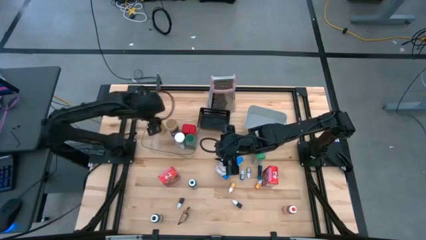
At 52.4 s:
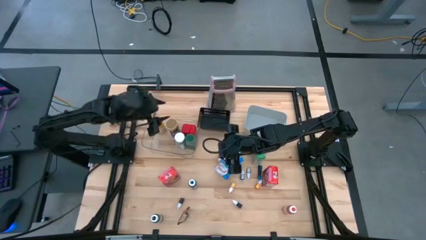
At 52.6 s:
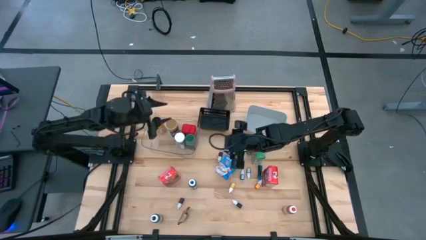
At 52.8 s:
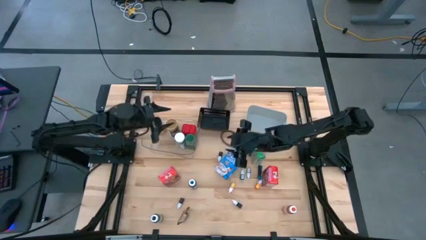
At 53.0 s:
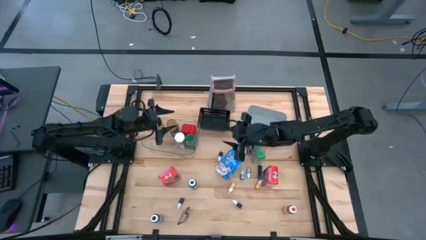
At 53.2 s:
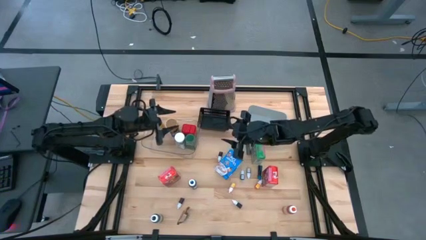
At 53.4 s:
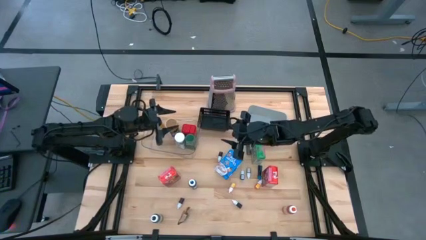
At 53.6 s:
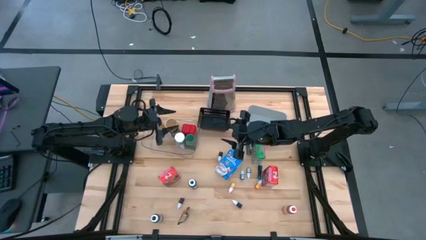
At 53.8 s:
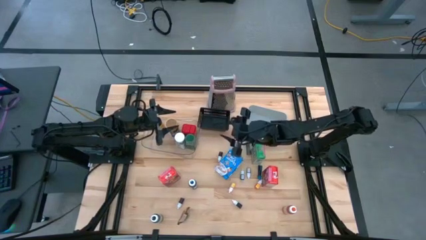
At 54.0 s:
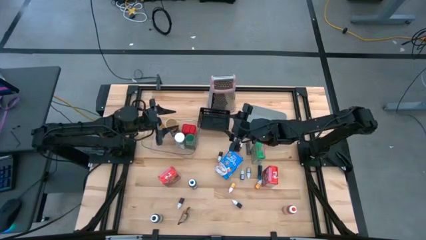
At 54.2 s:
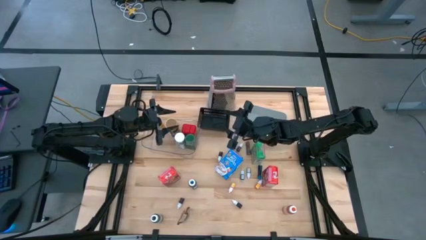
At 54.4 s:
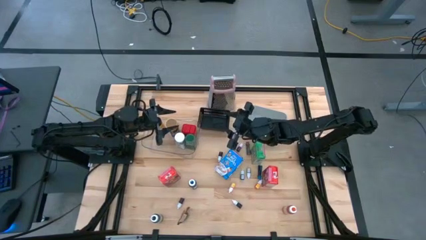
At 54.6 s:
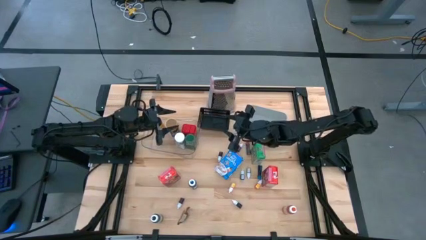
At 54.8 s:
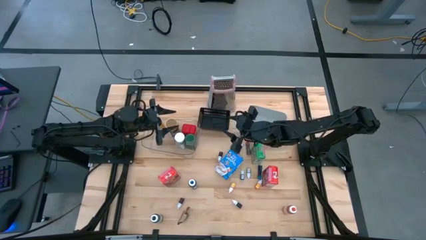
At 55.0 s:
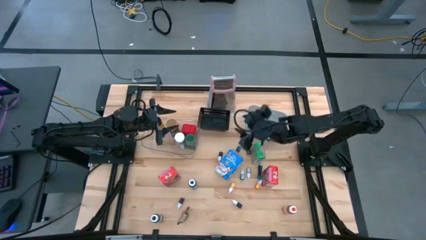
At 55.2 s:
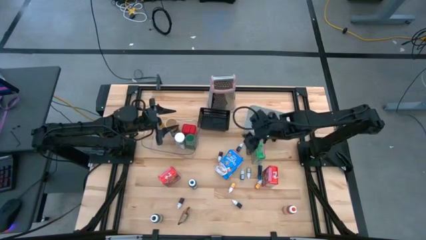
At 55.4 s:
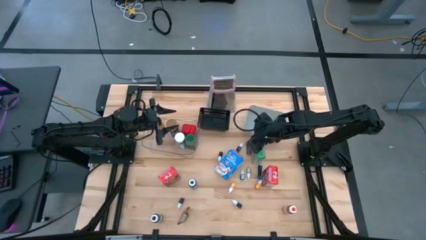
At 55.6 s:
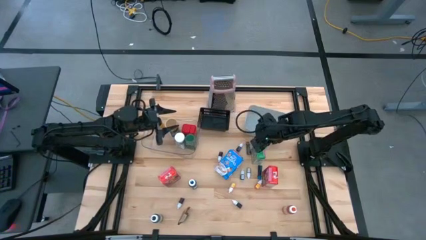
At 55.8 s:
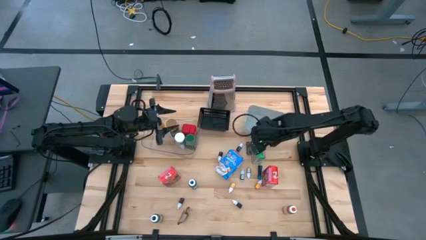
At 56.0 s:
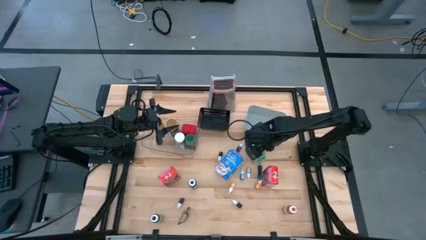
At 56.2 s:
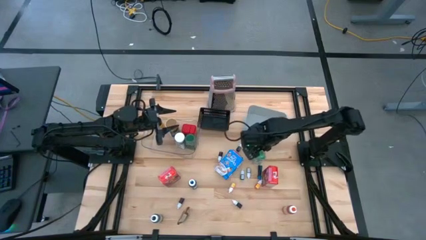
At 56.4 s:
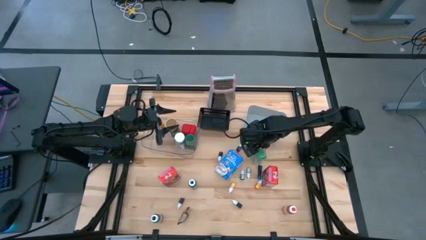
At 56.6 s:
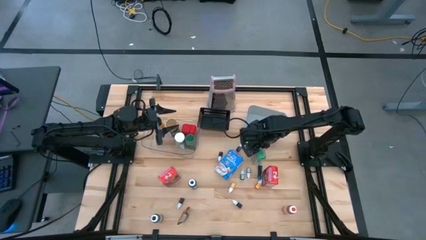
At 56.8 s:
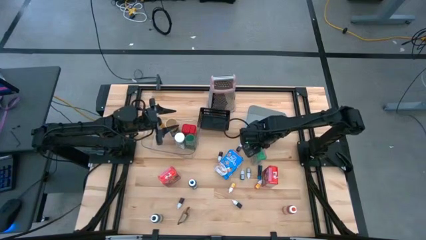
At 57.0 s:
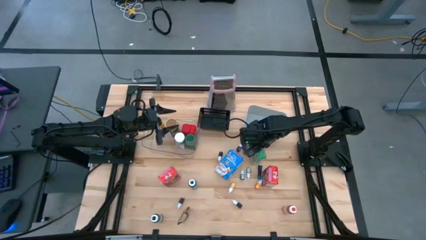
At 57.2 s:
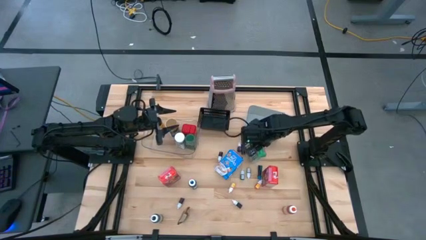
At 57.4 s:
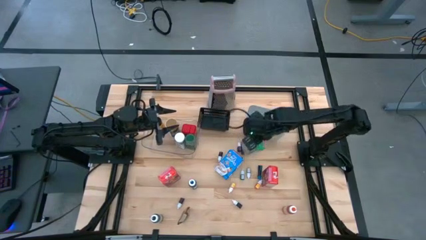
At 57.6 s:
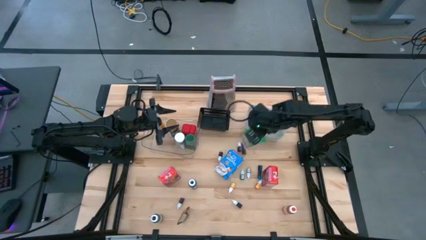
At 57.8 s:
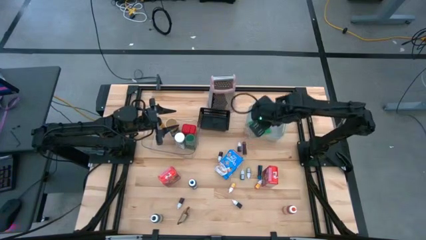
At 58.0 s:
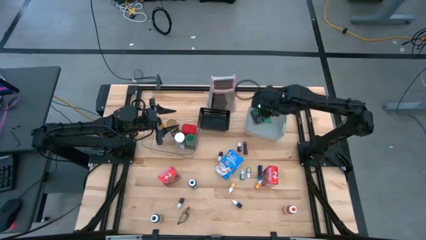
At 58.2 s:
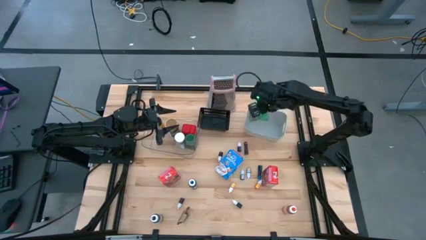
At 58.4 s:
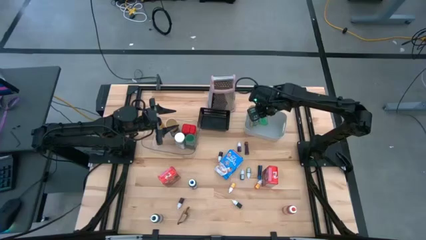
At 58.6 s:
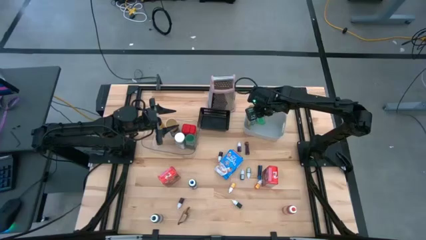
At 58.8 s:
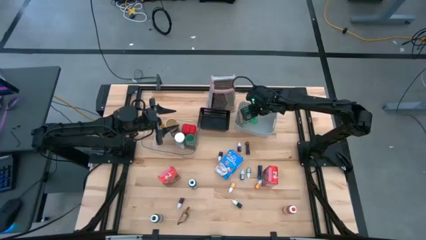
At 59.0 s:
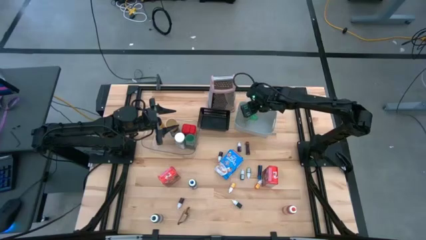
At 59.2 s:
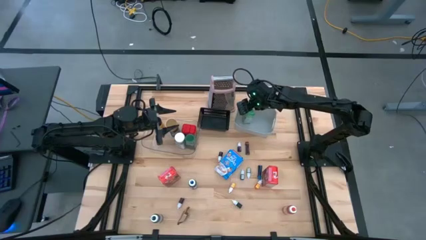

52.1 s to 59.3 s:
Task: Pick & Place Kitchen Items
Put the green cereal box into the gray bin

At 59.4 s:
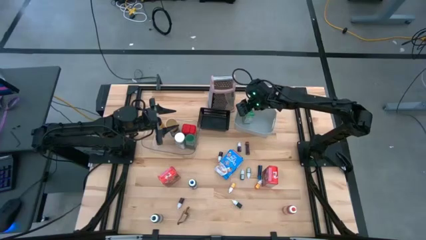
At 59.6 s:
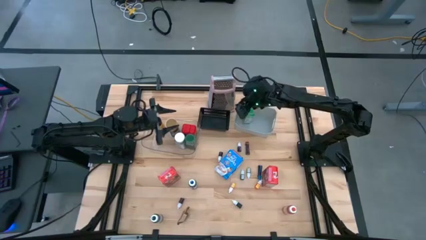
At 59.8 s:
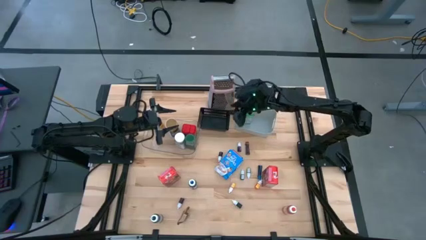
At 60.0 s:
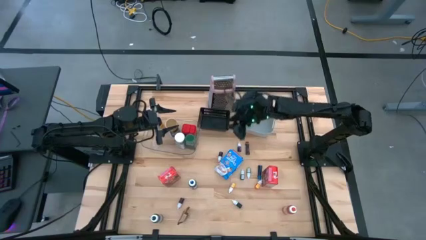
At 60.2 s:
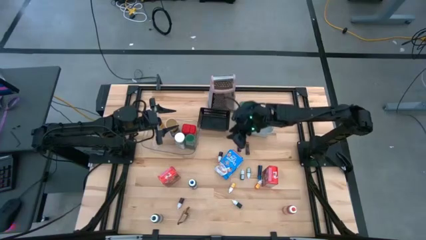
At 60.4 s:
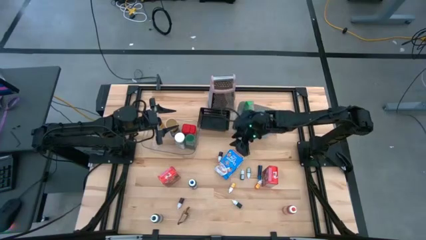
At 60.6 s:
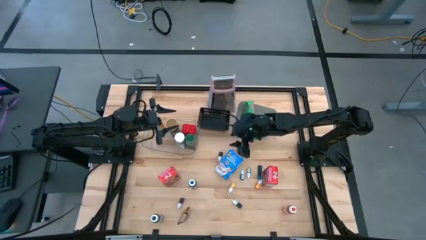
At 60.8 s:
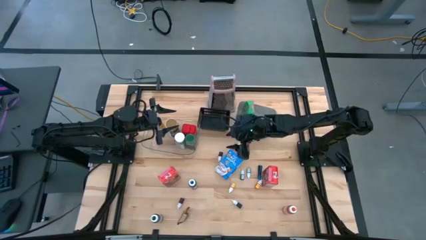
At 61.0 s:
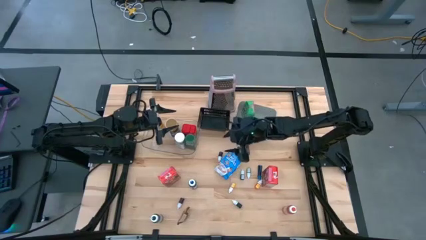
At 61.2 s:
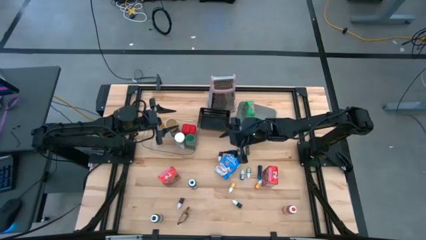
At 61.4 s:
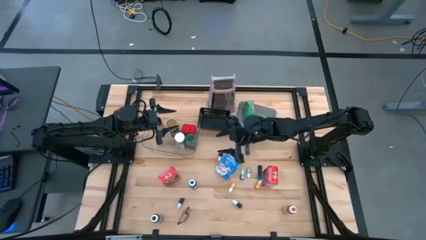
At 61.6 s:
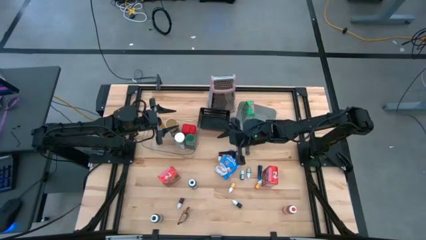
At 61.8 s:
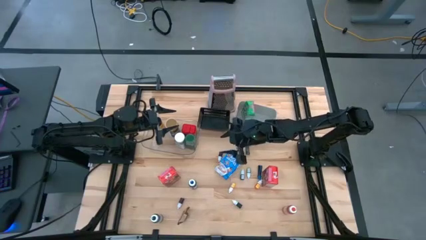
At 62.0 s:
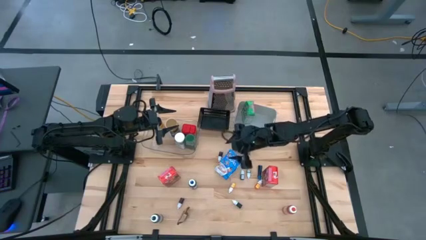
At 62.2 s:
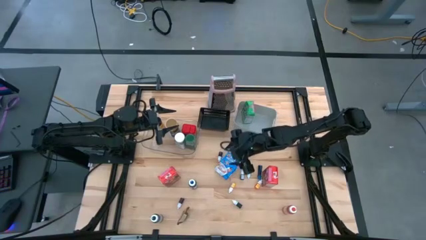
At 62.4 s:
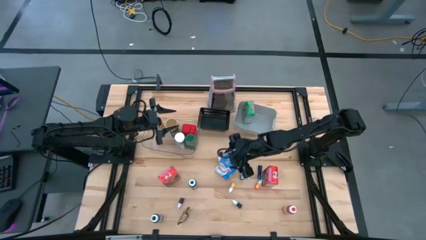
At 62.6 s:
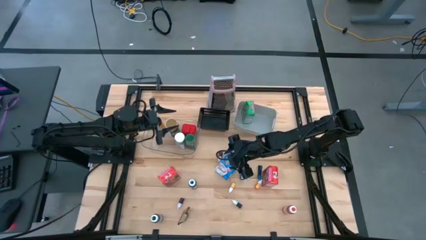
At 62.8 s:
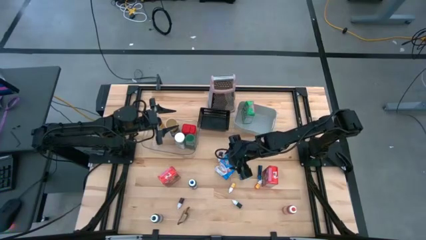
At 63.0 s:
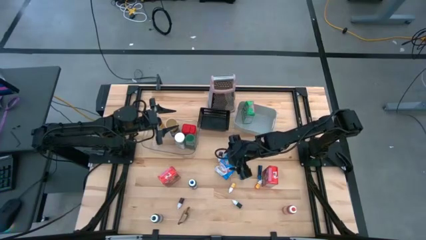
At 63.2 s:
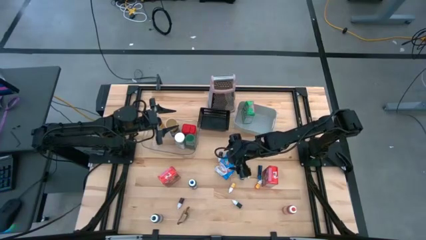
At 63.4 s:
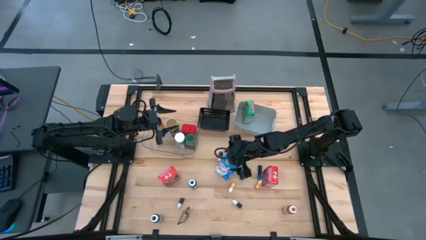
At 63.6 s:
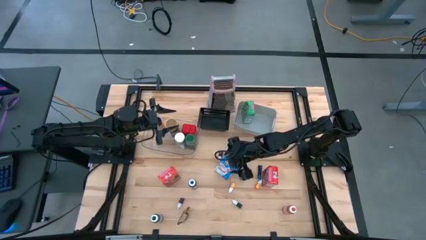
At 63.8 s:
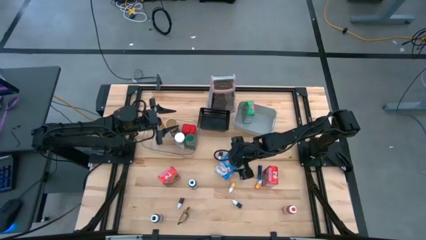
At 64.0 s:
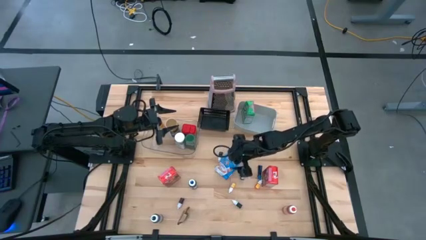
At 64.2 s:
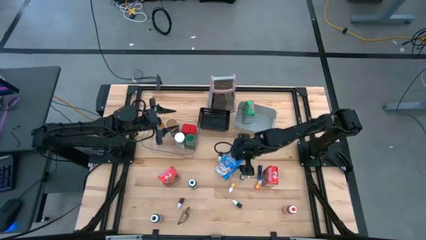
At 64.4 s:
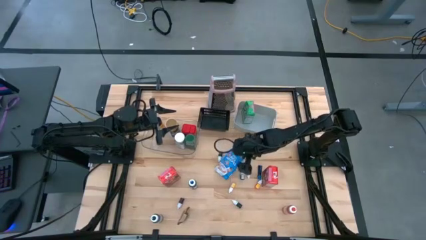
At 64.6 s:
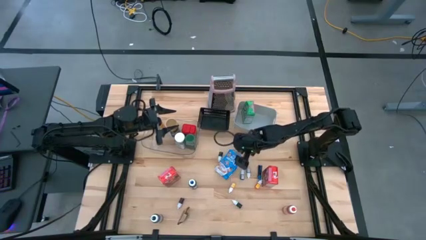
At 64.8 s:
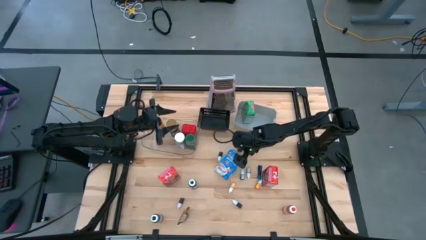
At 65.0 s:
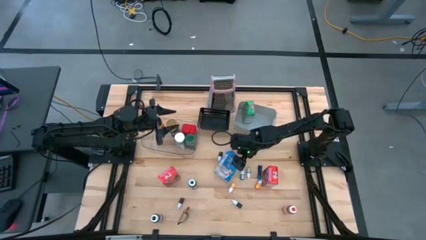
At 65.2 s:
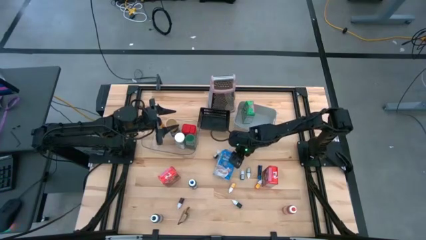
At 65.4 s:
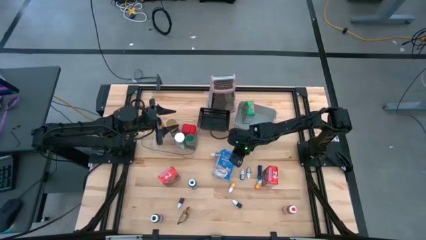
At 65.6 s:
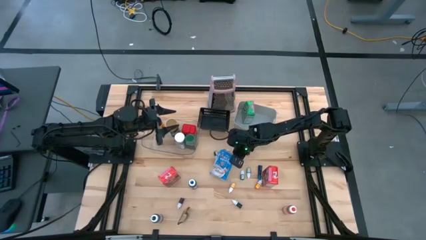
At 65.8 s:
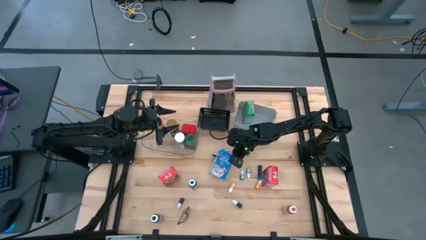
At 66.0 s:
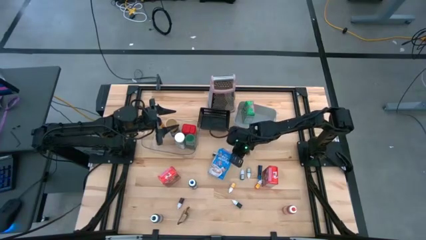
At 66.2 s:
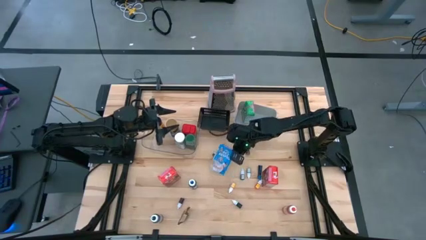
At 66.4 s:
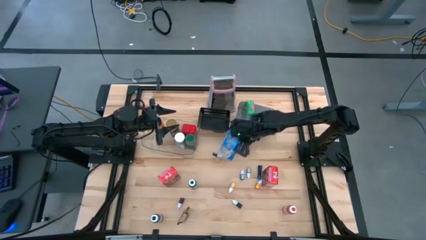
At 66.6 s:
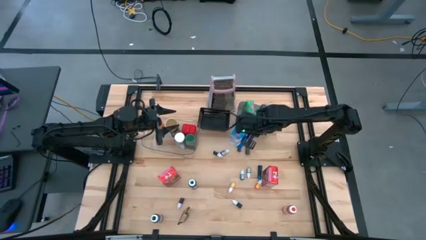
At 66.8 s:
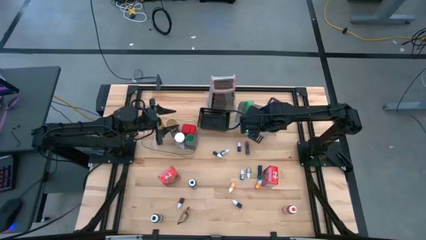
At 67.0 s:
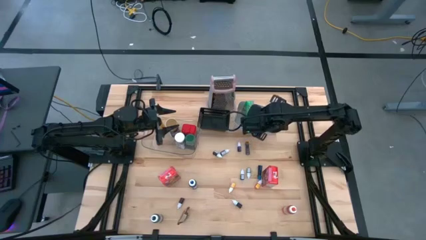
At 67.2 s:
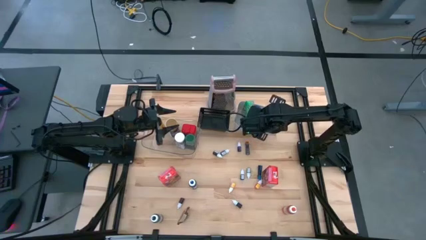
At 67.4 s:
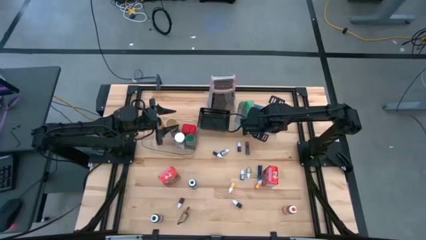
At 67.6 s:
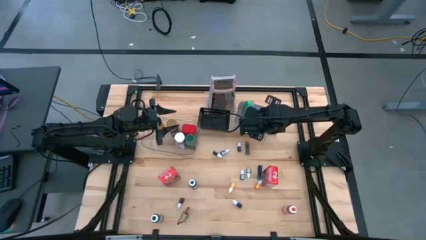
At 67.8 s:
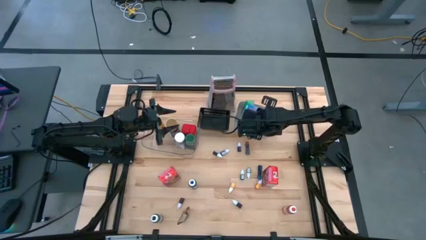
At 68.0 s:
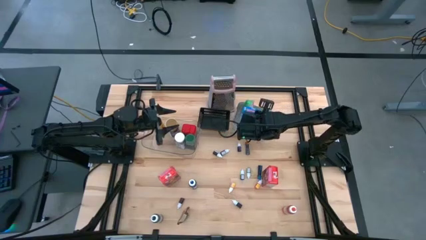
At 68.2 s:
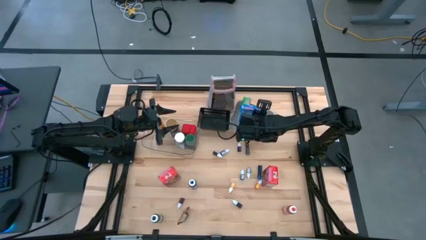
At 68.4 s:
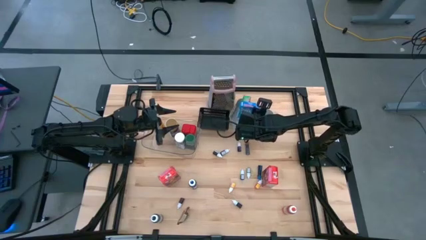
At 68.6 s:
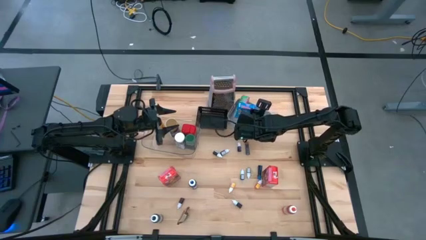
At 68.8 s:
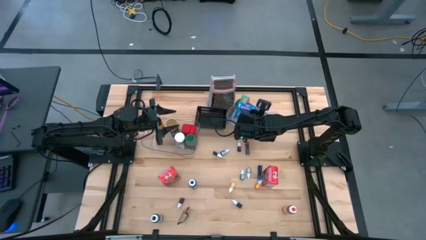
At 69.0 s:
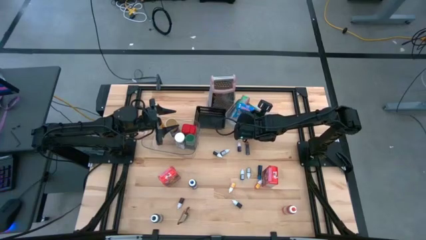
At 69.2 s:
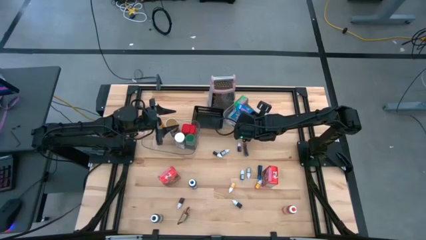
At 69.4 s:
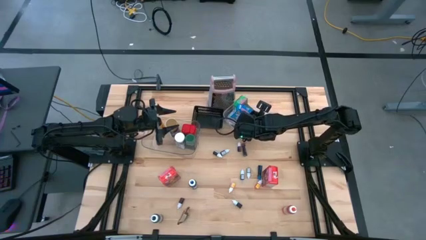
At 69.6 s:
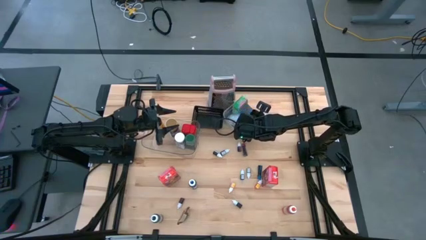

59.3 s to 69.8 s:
Put the blue cereal box into the gray bin
